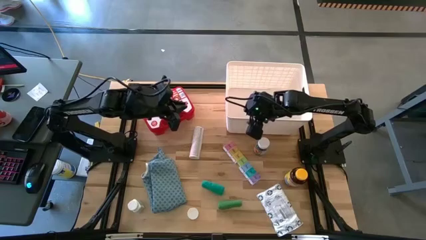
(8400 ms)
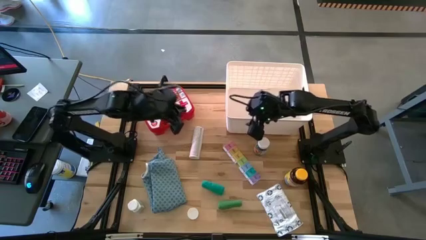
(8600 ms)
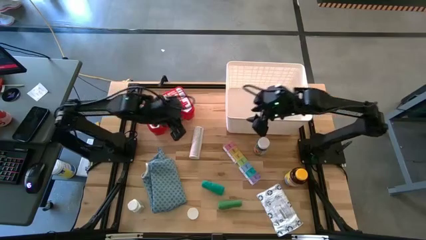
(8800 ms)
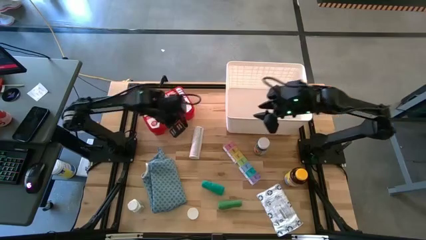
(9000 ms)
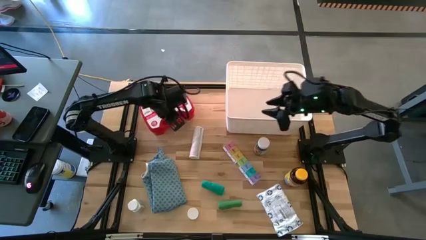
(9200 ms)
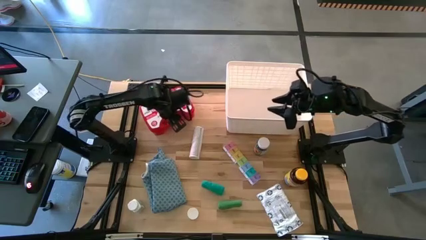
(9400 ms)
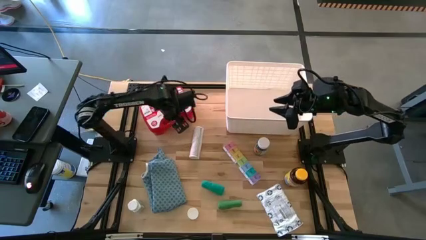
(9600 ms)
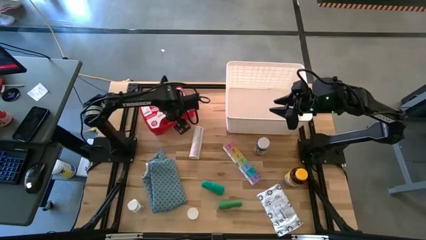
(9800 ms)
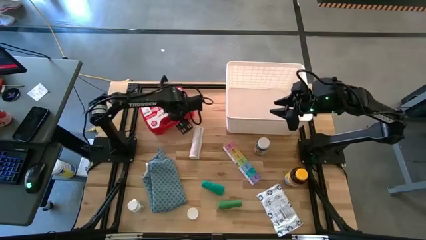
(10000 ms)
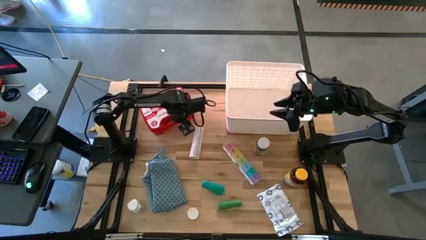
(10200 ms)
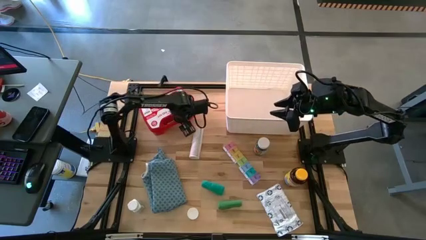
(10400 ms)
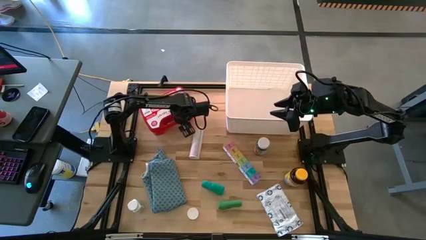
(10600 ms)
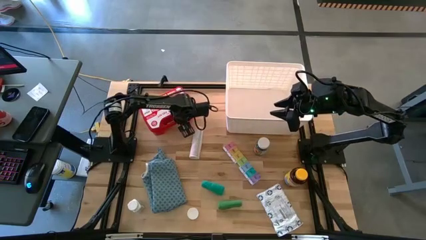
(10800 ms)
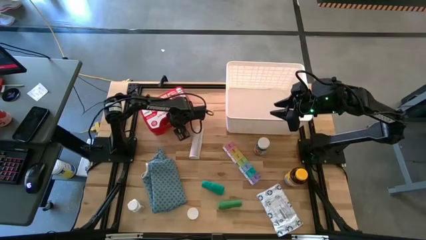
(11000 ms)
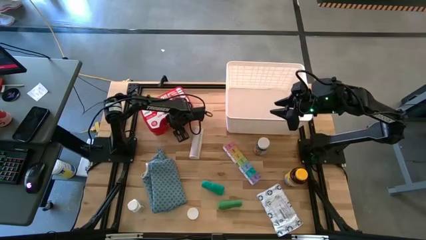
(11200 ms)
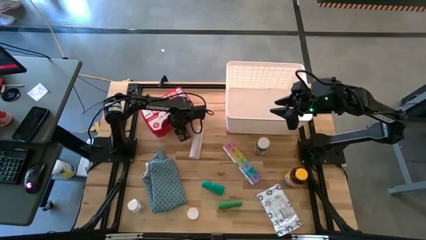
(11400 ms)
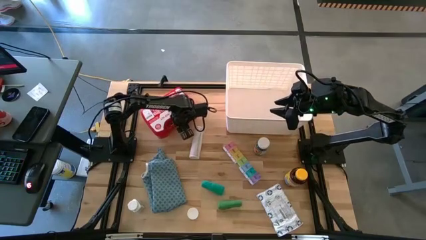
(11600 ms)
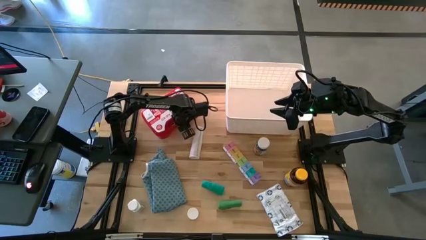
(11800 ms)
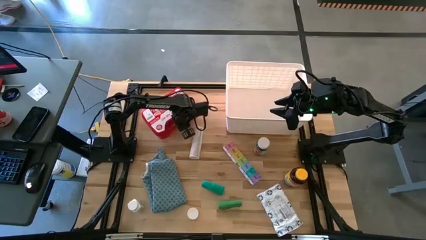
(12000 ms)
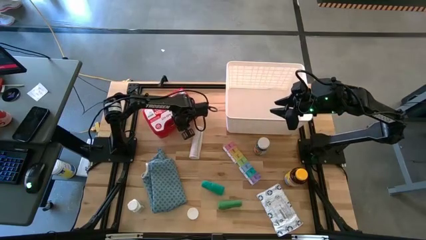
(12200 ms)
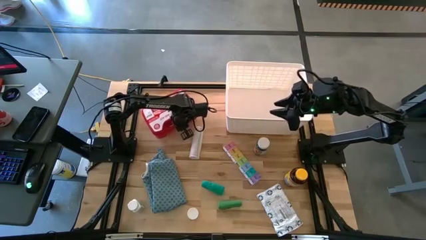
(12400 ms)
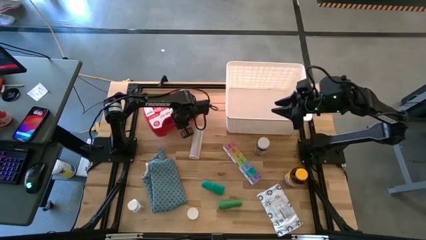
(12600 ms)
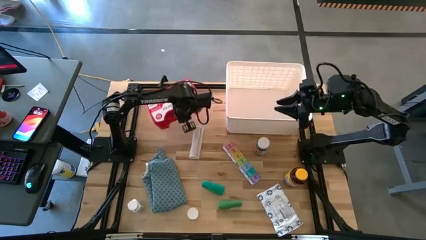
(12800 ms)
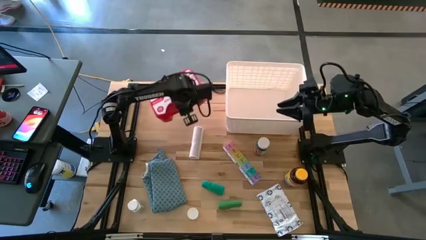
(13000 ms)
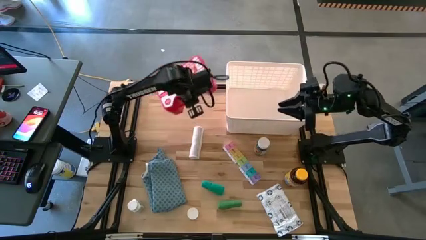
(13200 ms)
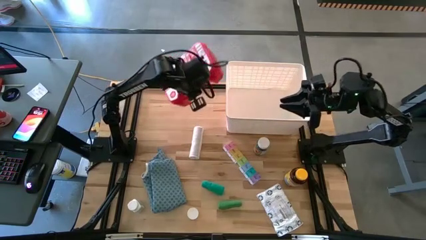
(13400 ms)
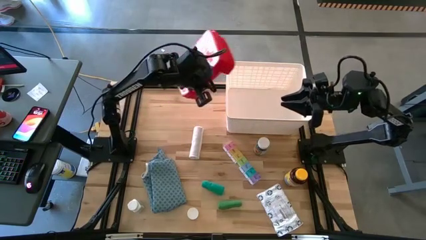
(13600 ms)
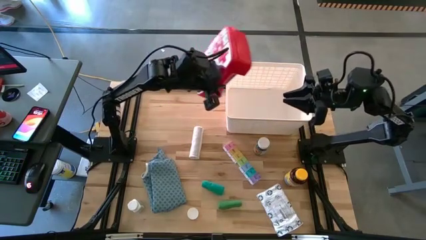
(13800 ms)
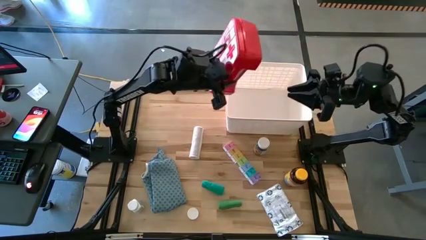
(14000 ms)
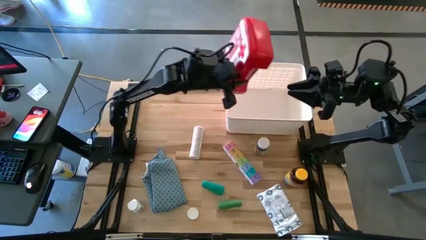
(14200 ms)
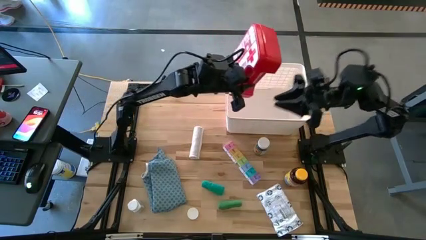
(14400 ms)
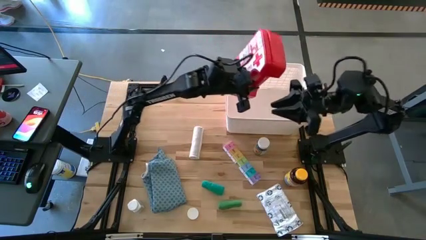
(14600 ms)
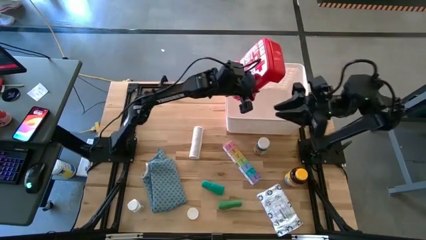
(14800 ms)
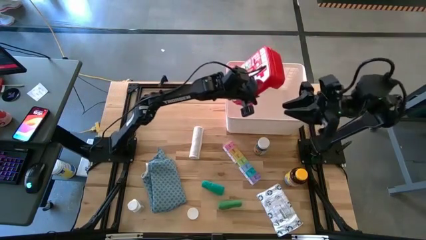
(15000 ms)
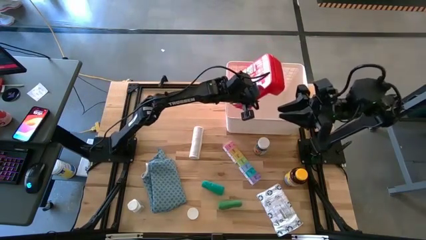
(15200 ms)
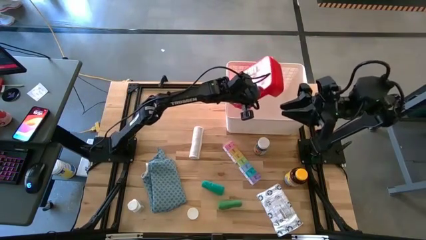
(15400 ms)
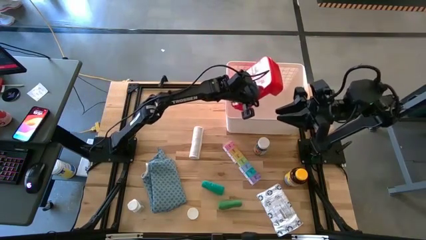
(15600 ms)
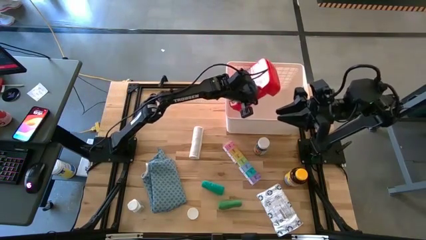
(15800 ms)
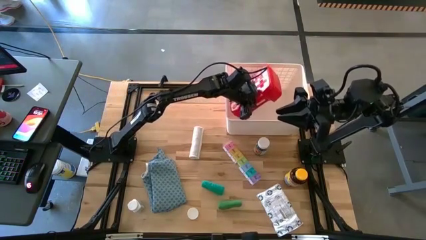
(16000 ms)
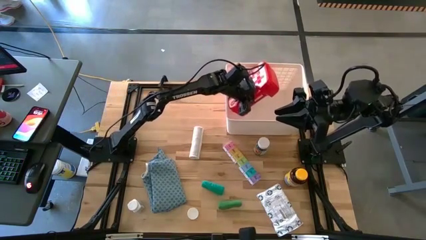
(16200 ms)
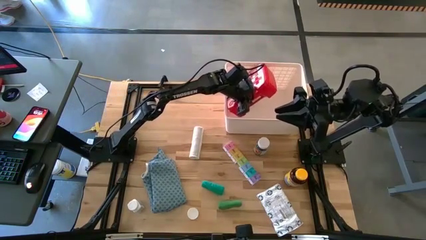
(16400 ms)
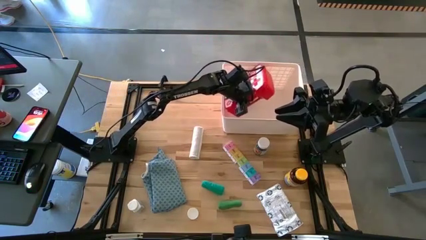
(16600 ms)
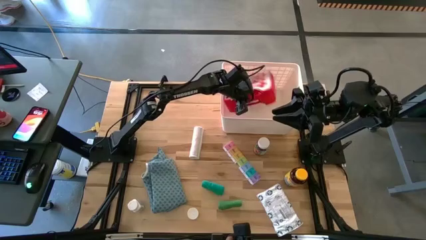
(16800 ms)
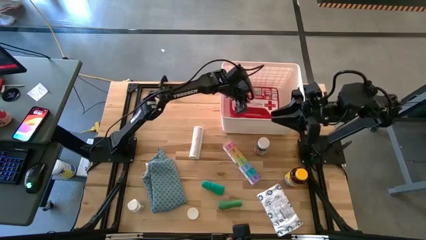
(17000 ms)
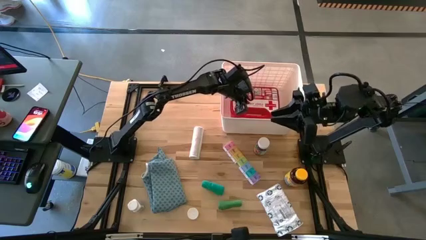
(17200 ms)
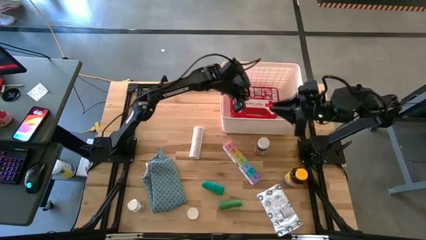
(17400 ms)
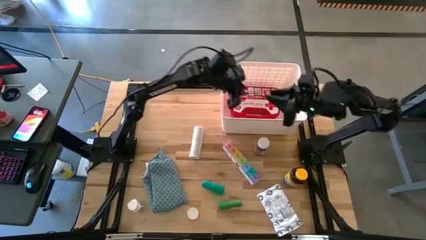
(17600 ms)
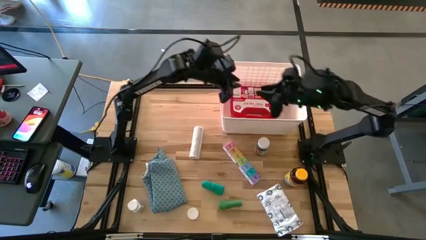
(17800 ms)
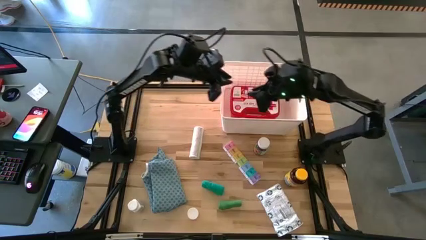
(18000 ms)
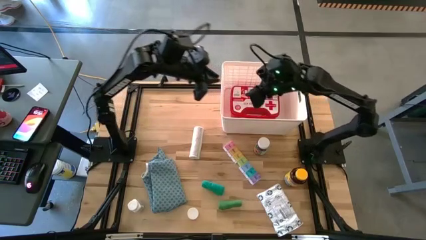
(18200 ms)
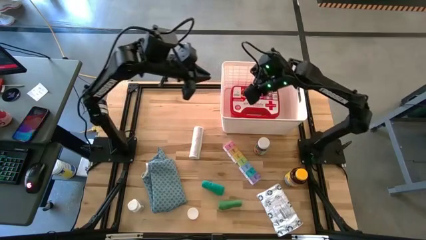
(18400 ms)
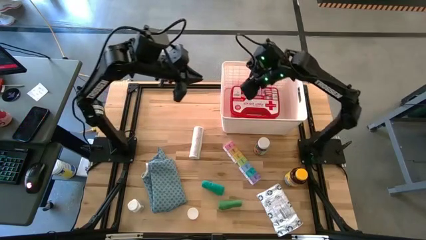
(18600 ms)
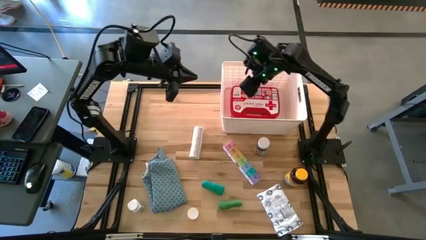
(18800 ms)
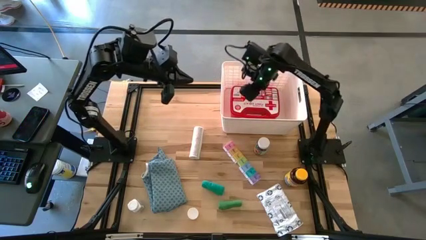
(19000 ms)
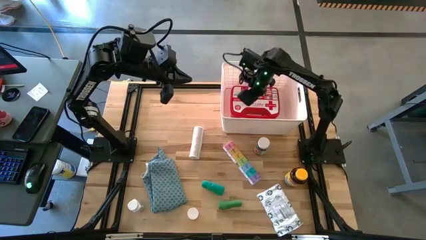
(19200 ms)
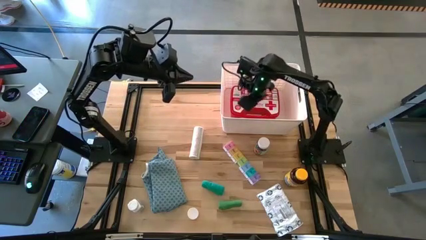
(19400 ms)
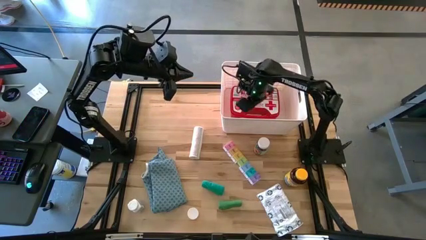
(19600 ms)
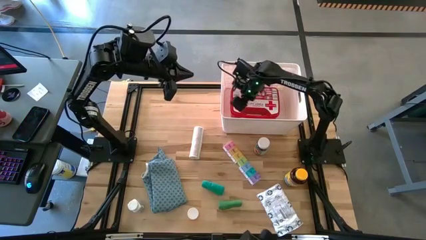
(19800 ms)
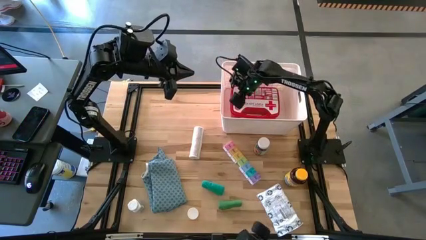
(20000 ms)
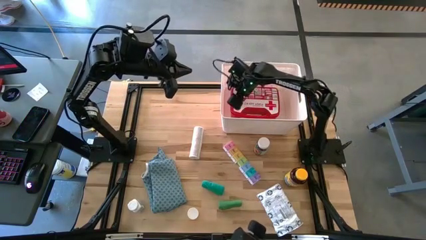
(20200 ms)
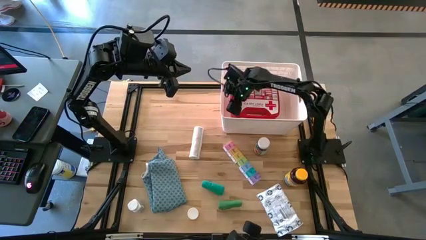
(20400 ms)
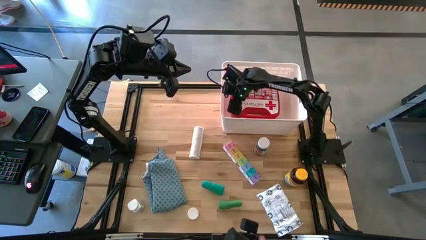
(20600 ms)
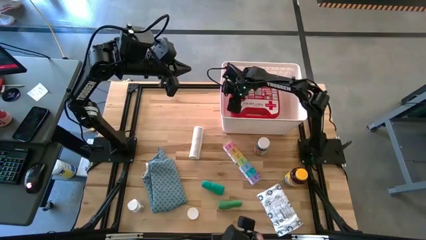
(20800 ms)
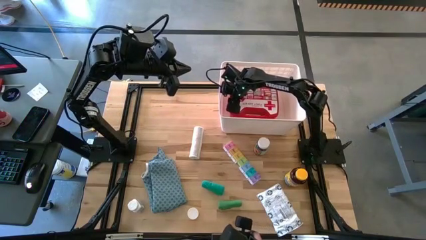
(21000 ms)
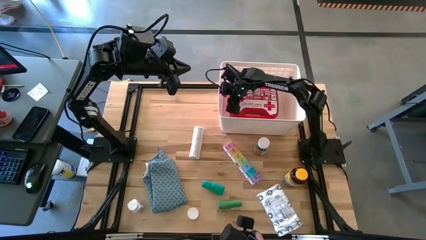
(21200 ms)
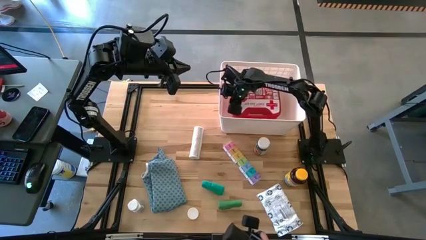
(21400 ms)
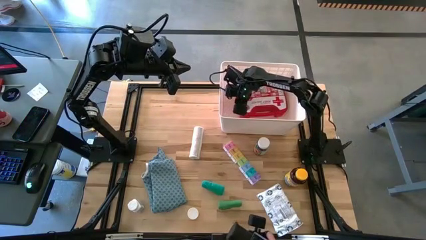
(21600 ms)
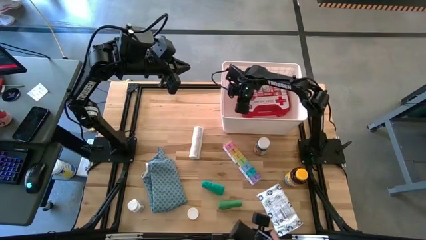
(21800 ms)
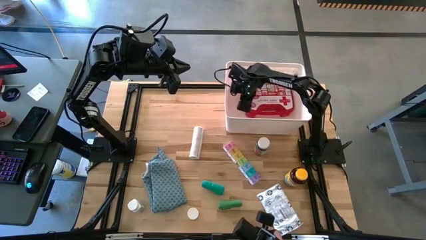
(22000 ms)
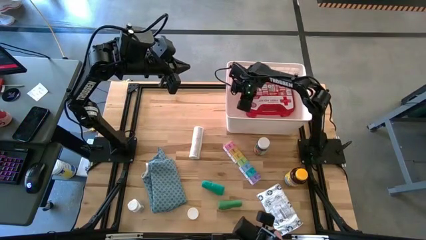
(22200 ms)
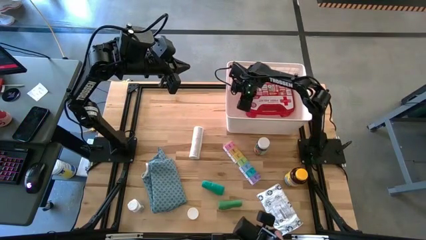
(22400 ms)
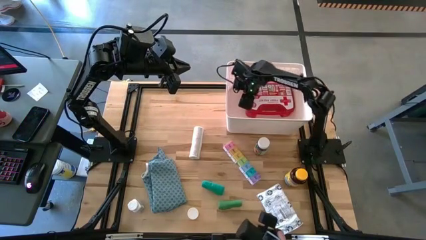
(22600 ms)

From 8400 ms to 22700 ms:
Task: Pick & place medical supplies in basket/bin
Put the red first aid kit into the white bin
